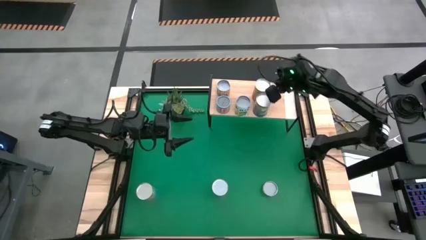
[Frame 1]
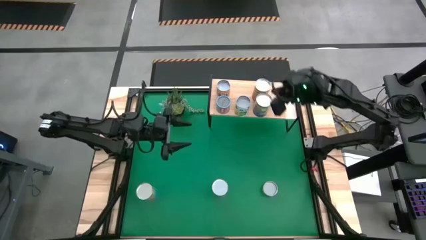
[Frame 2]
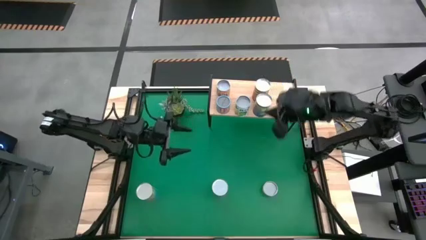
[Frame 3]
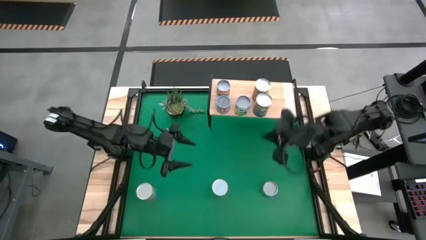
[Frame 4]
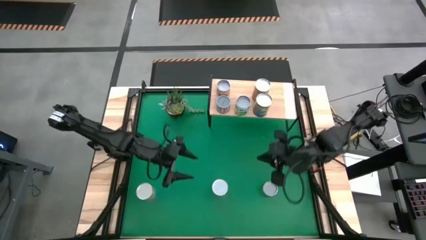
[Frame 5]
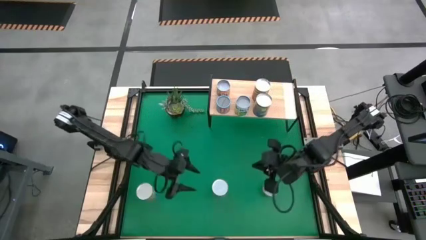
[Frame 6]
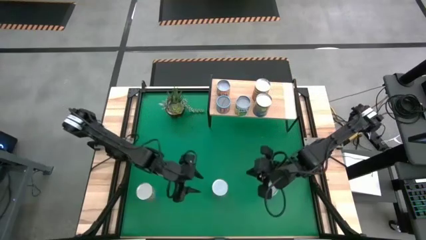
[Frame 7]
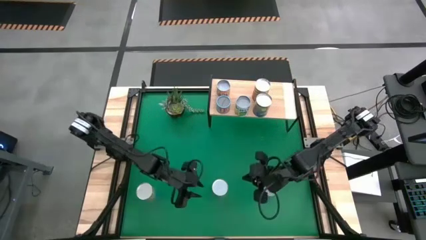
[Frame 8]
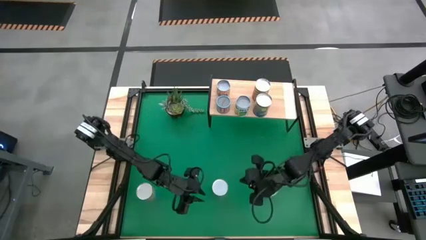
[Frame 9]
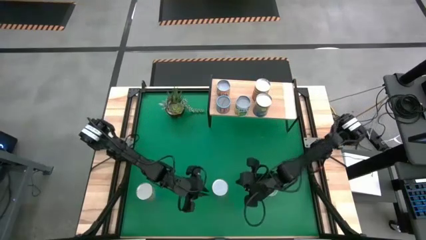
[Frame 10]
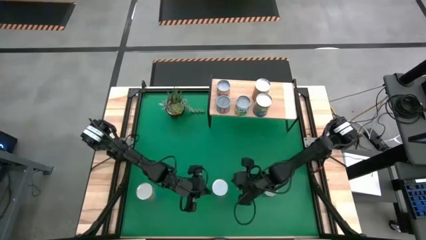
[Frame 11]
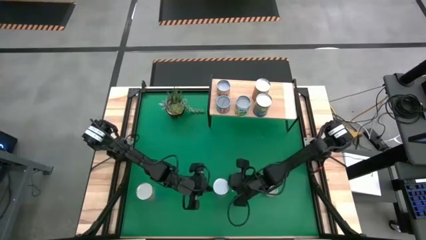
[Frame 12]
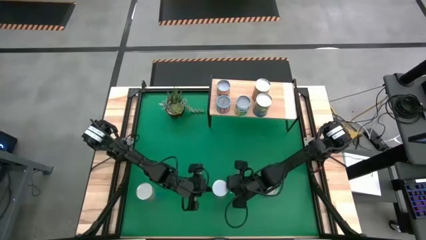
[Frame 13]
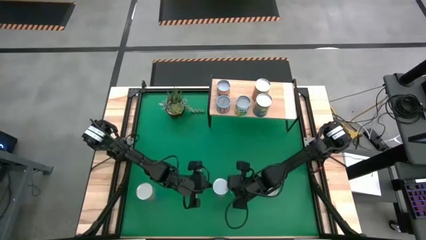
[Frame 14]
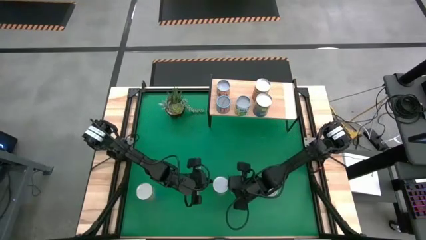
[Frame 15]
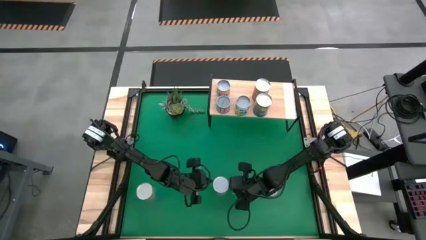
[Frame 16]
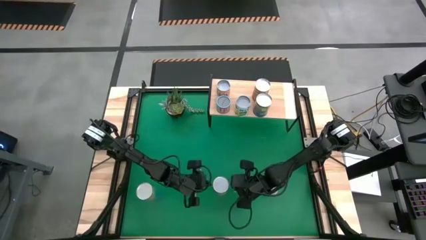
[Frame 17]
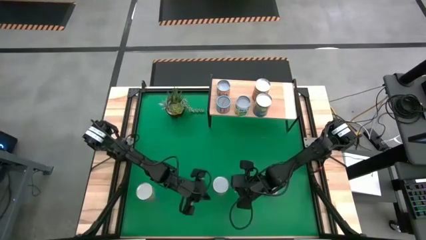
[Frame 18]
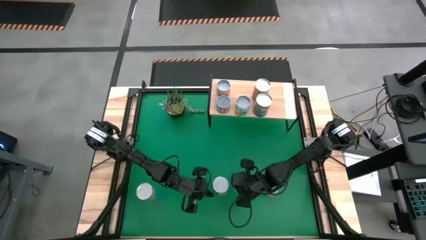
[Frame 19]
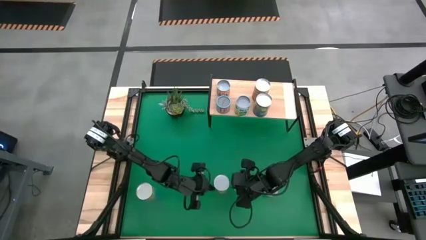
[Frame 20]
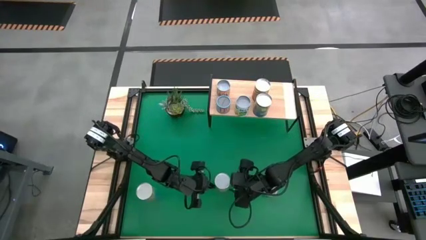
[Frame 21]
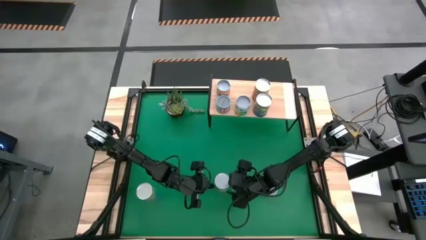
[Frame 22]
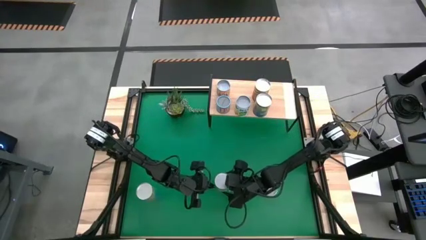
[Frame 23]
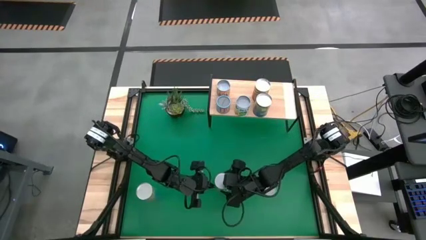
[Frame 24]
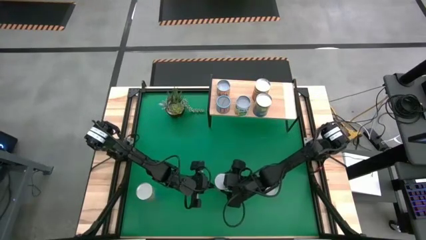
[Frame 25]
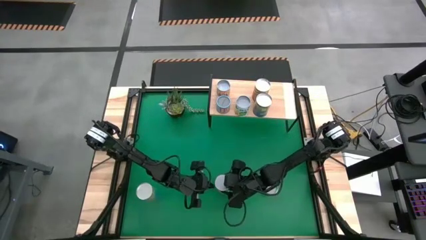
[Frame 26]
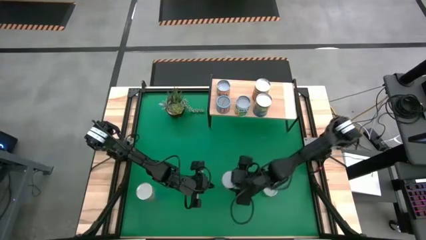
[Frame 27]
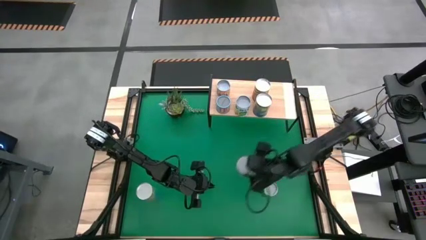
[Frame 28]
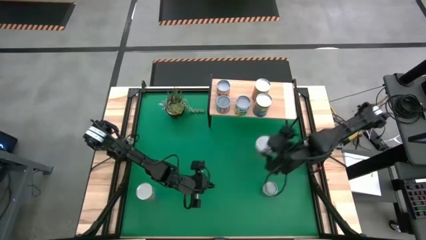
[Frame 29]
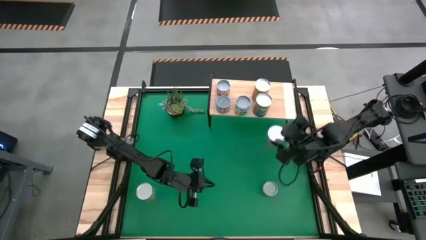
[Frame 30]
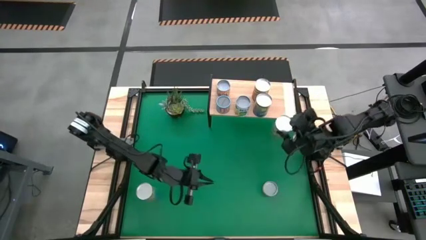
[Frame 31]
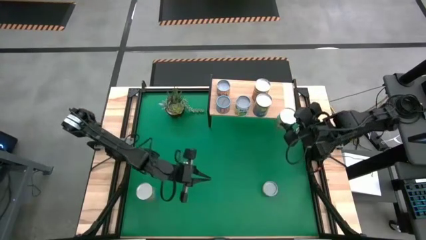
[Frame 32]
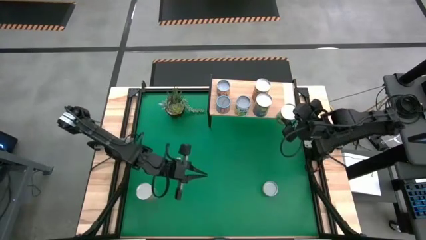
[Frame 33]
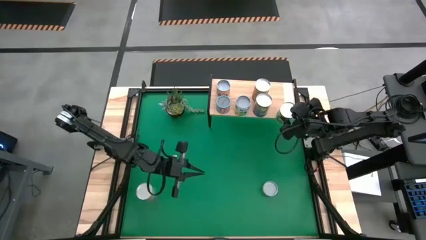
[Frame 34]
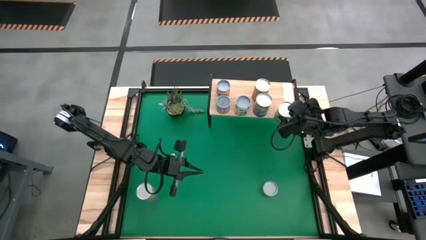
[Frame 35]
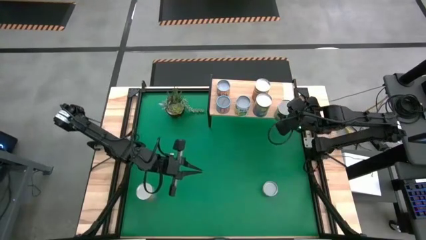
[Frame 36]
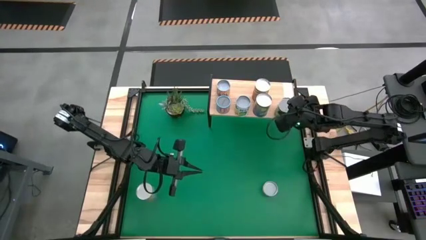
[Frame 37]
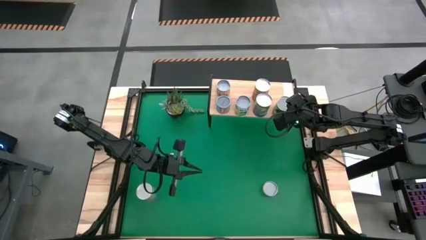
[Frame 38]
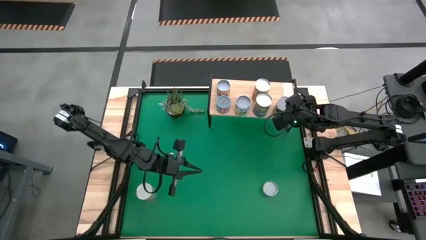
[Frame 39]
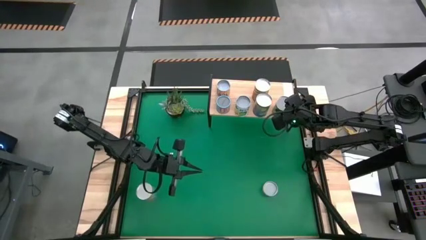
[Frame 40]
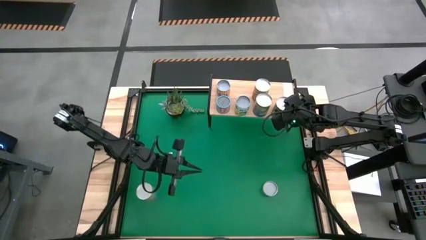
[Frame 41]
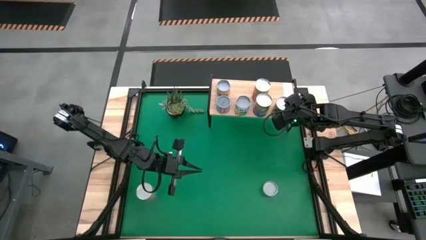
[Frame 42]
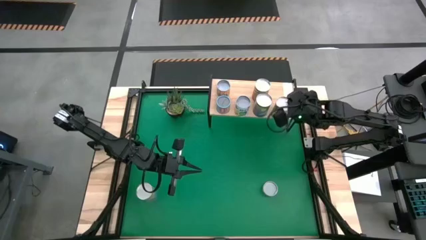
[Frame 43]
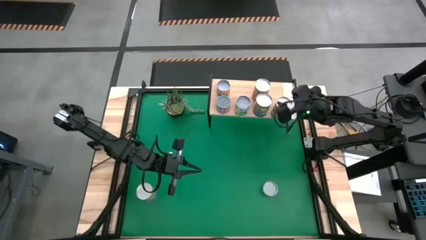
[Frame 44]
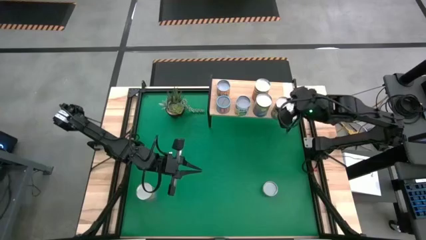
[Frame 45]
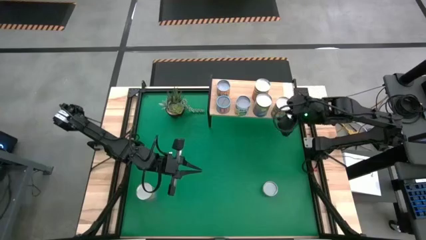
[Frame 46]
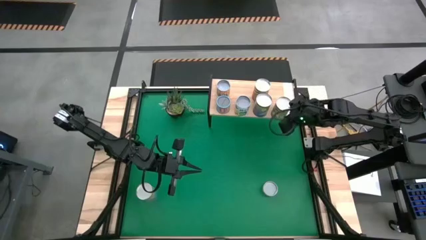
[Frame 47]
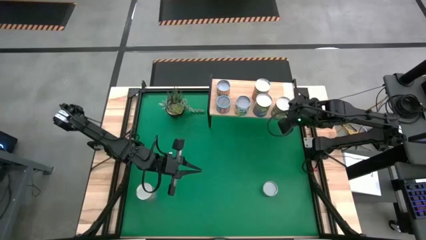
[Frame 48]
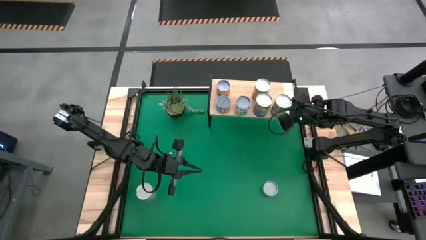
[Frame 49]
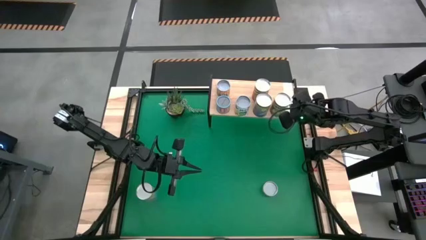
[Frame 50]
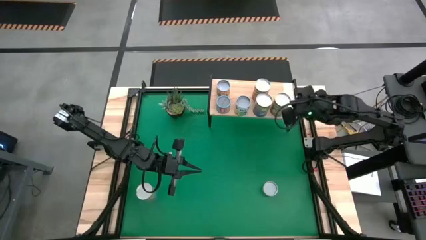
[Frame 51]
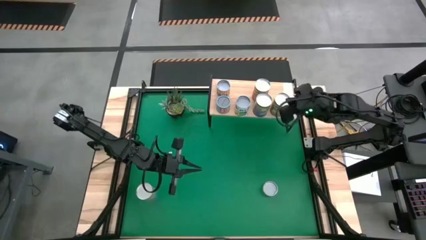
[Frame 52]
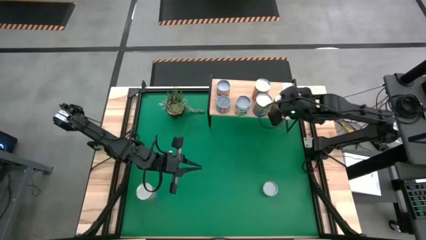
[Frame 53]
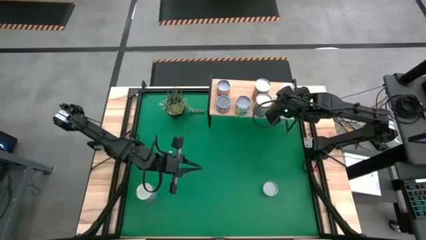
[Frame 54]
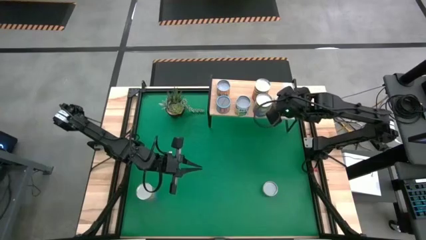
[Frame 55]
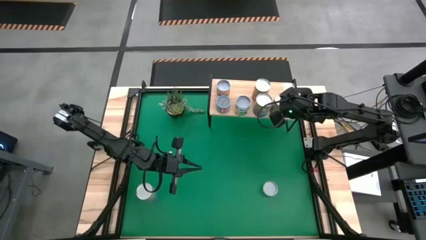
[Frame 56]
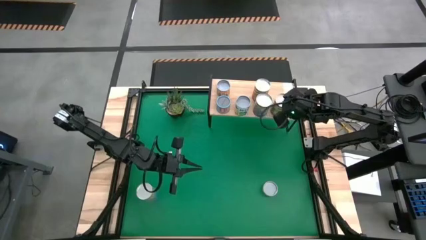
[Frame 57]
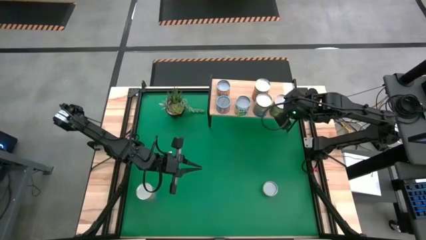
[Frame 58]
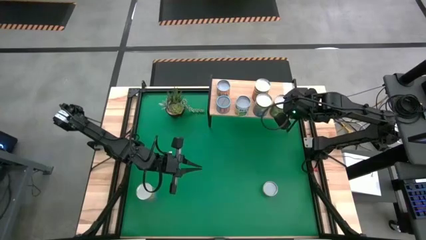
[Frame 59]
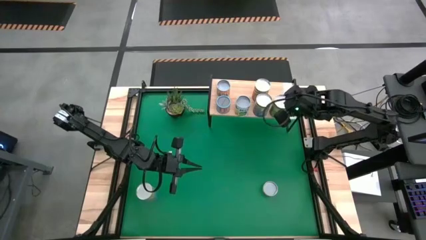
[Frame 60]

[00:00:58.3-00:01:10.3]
Task: Pick and place cans onto a shelf
Put the canned pears on the shelf

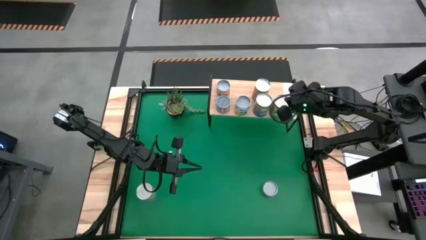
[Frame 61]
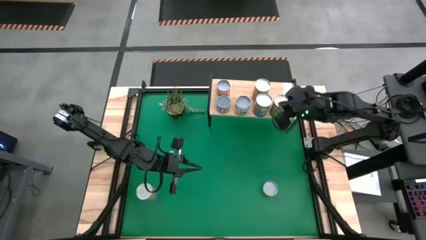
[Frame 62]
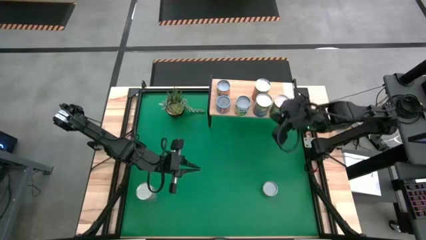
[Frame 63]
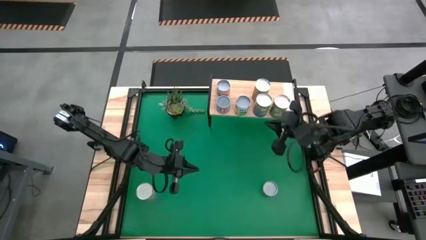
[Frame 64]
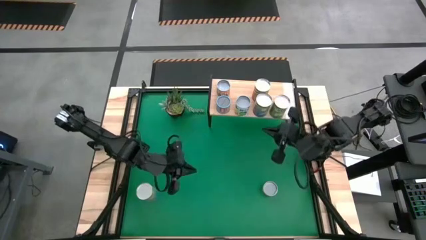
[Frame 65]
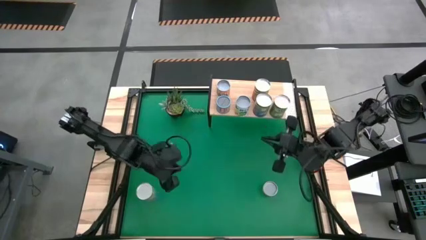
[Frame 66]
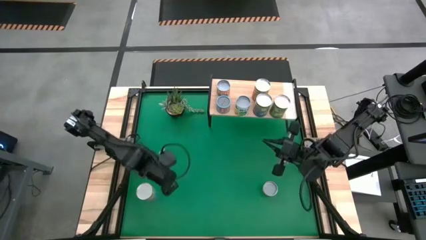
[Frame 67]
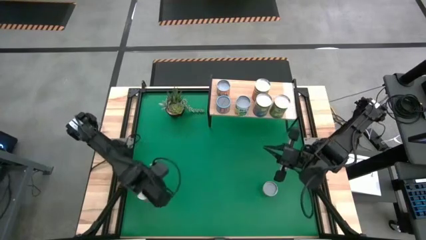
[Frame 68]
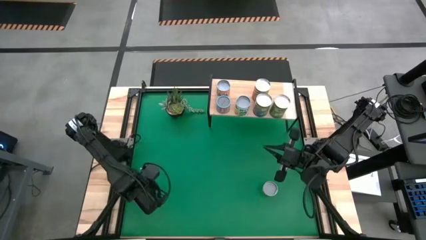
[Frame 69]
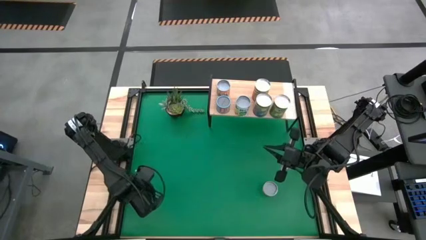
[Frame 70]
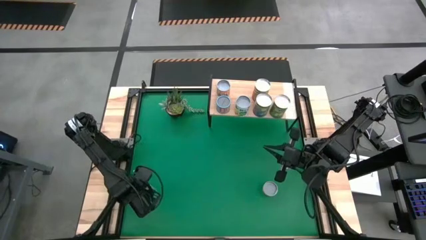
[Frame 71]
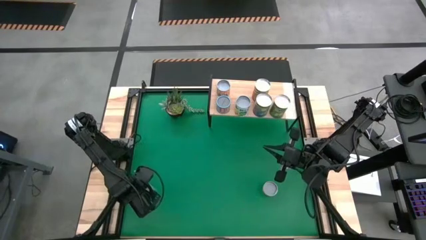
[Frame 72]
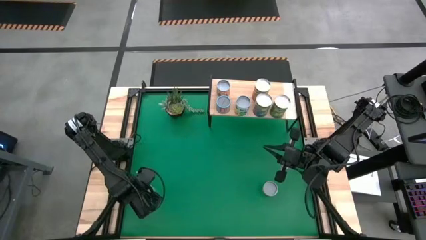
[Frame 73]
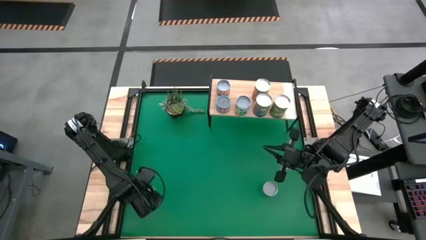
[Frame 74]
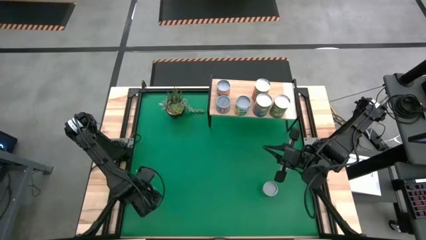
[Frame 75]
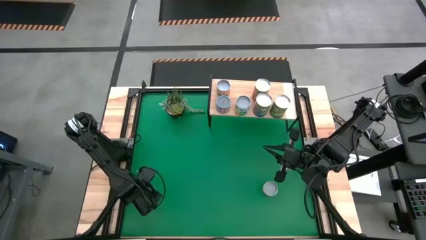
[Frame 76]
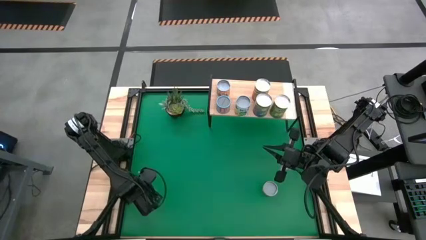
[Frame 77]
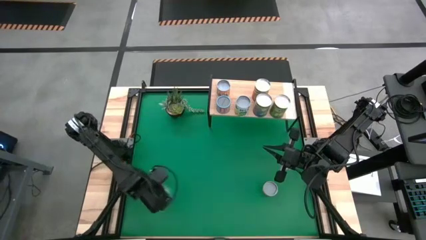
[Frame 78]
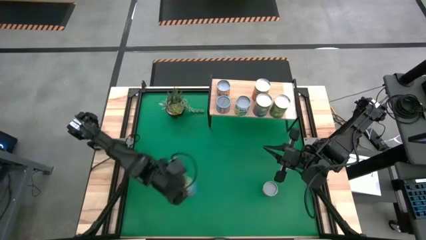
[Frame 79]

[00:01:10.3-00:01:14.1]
Put the canned cherries on the shelf
